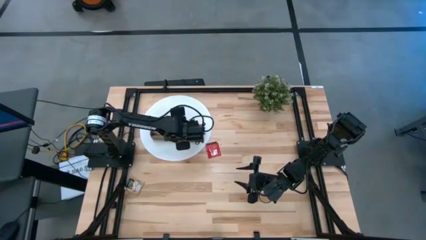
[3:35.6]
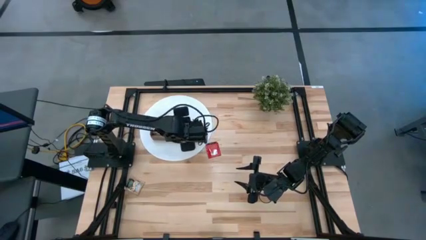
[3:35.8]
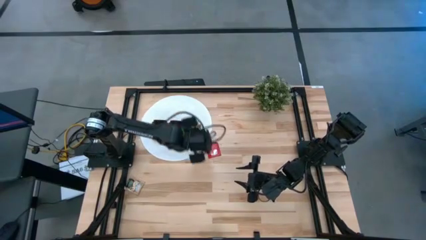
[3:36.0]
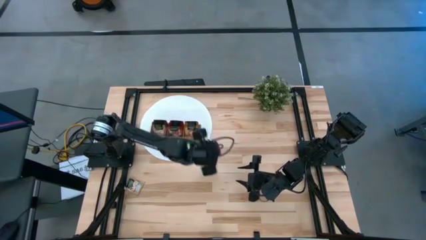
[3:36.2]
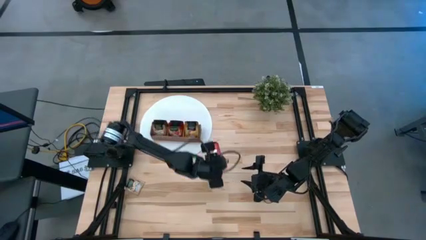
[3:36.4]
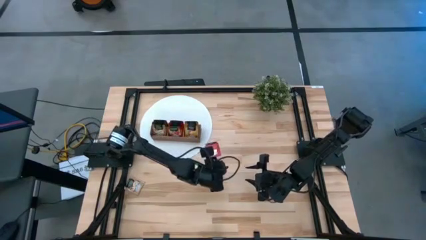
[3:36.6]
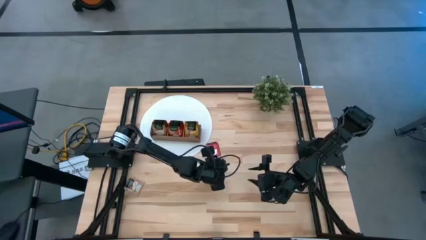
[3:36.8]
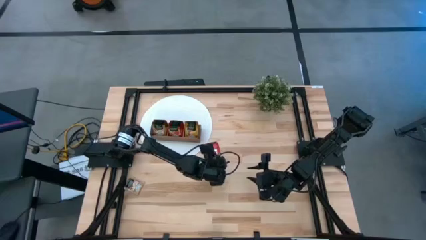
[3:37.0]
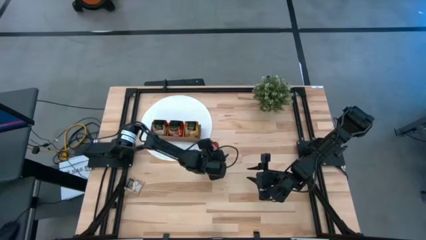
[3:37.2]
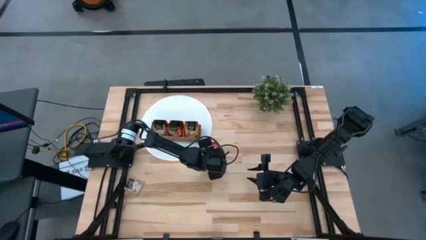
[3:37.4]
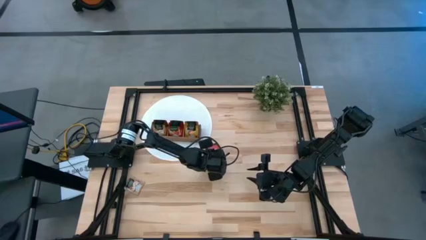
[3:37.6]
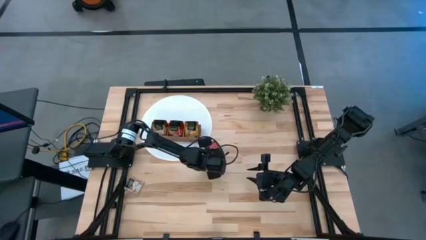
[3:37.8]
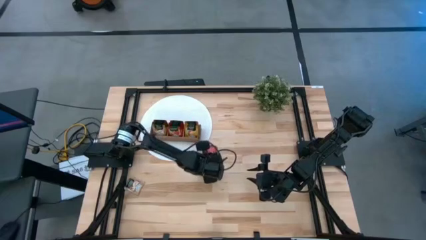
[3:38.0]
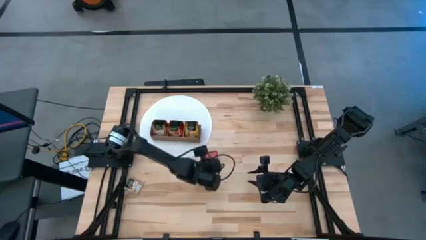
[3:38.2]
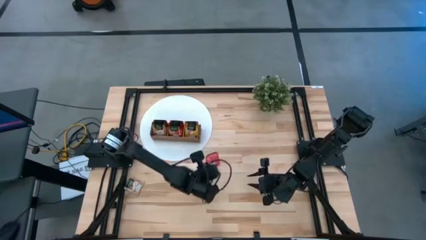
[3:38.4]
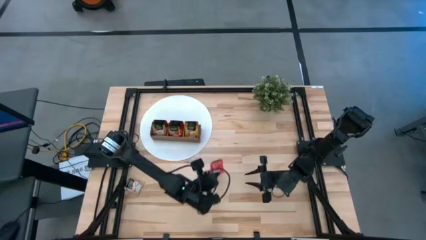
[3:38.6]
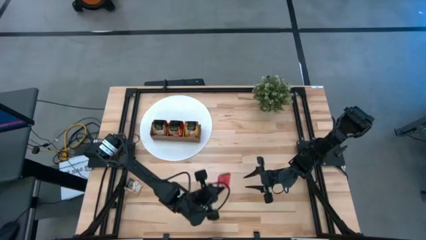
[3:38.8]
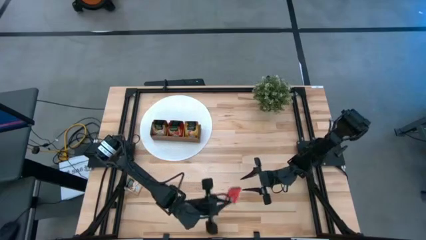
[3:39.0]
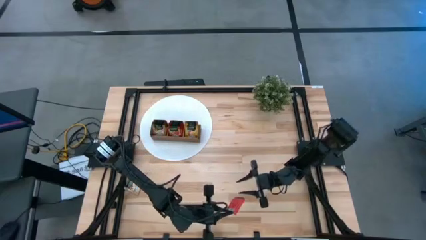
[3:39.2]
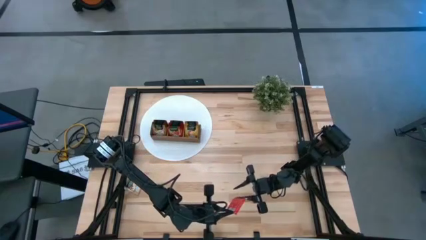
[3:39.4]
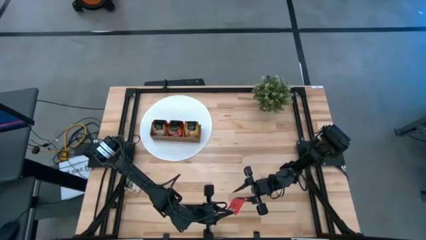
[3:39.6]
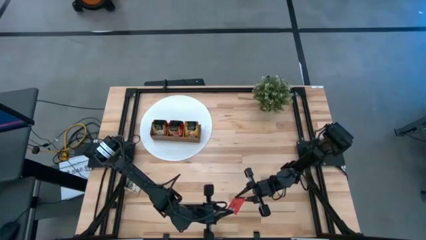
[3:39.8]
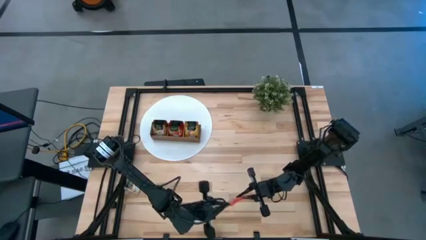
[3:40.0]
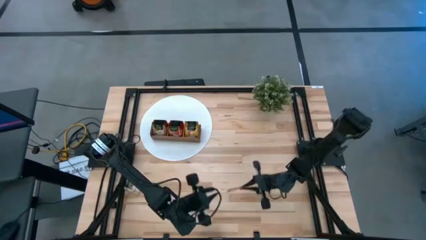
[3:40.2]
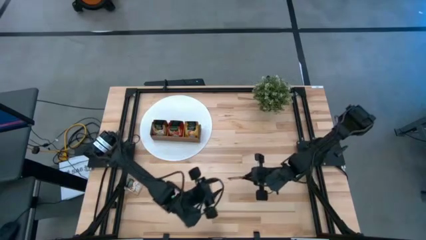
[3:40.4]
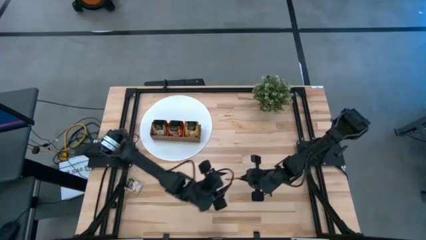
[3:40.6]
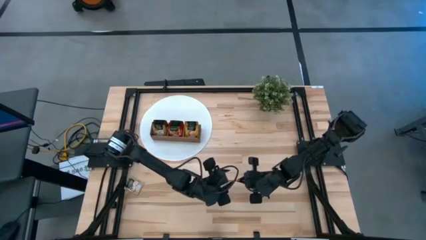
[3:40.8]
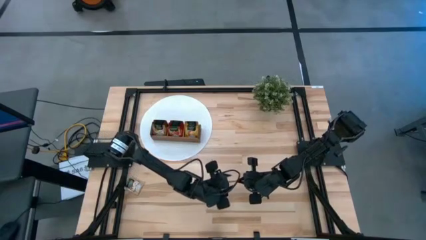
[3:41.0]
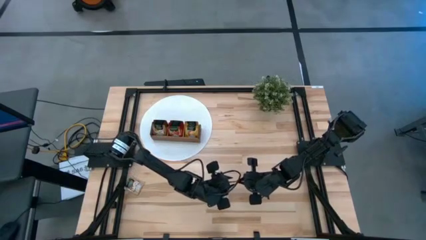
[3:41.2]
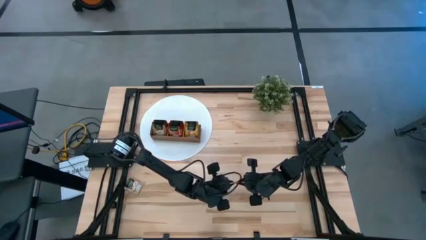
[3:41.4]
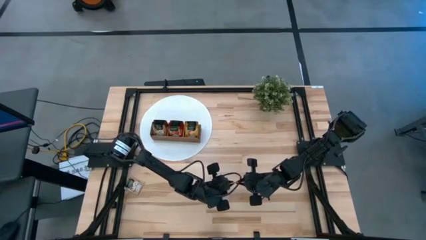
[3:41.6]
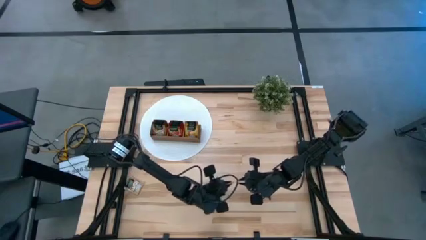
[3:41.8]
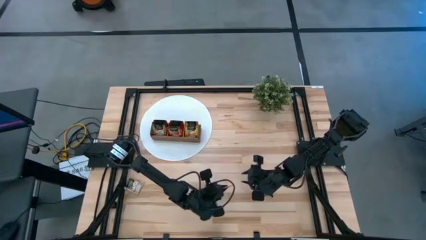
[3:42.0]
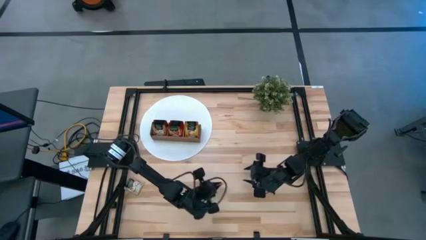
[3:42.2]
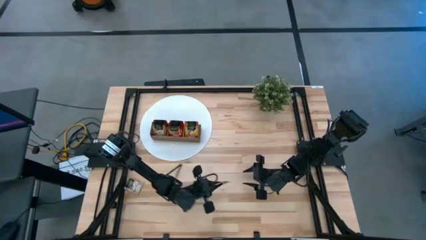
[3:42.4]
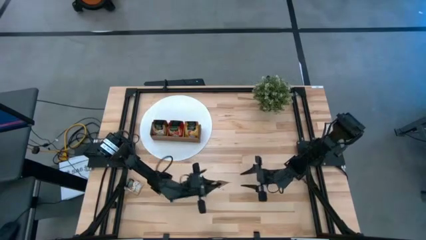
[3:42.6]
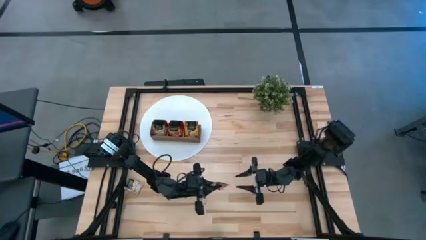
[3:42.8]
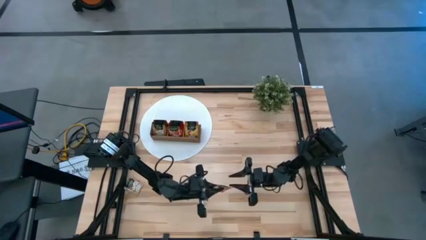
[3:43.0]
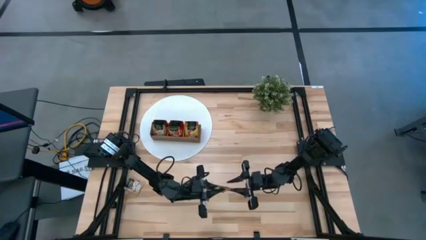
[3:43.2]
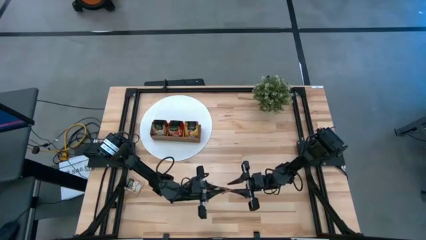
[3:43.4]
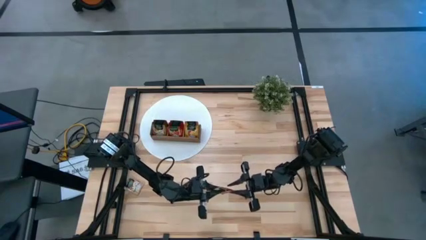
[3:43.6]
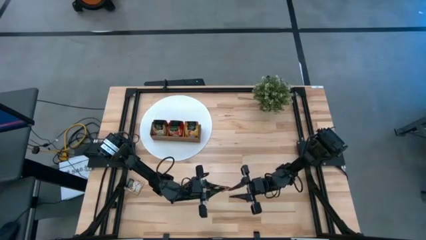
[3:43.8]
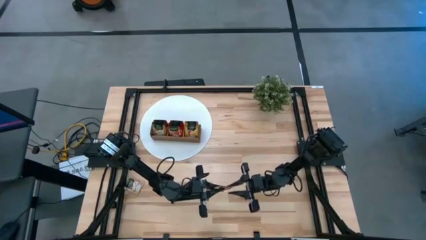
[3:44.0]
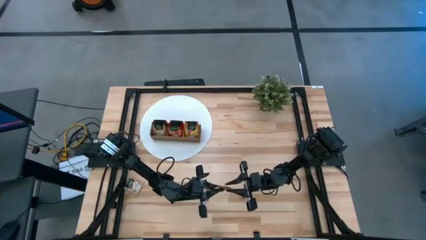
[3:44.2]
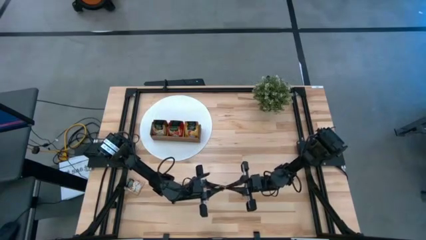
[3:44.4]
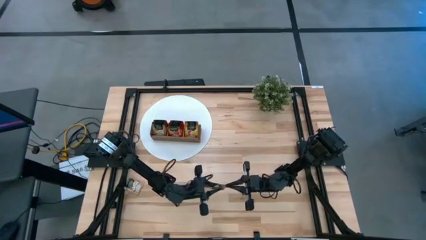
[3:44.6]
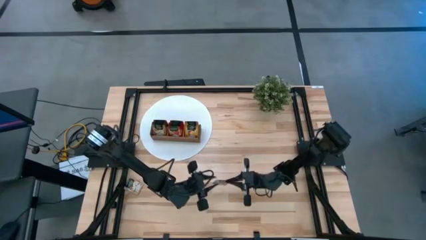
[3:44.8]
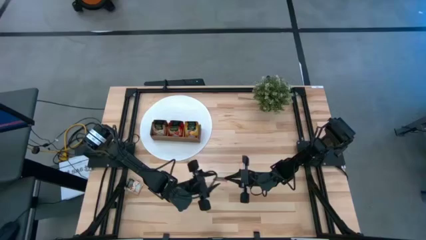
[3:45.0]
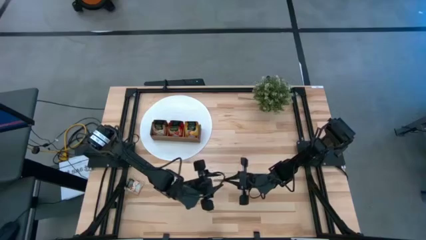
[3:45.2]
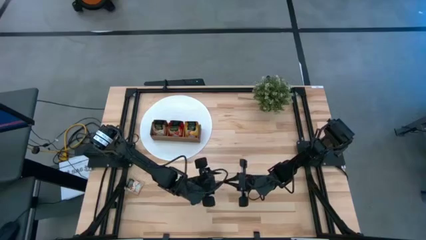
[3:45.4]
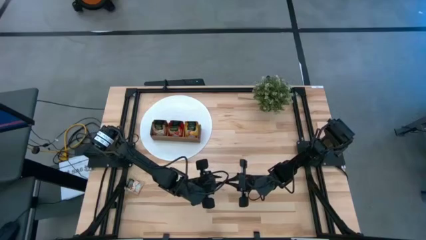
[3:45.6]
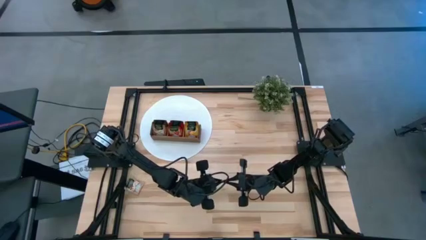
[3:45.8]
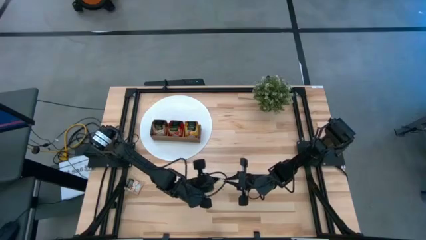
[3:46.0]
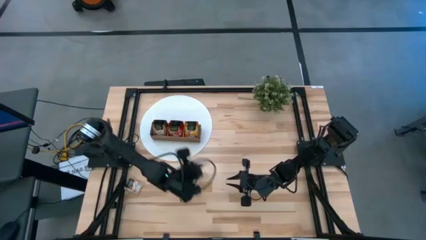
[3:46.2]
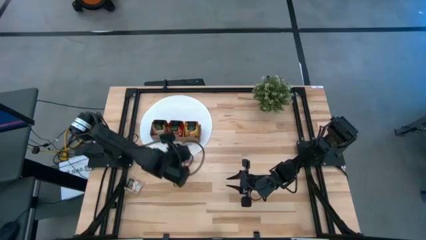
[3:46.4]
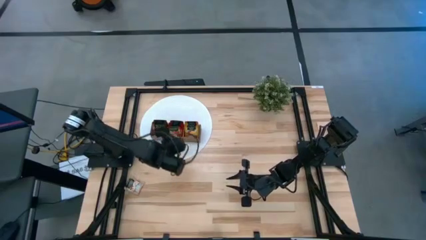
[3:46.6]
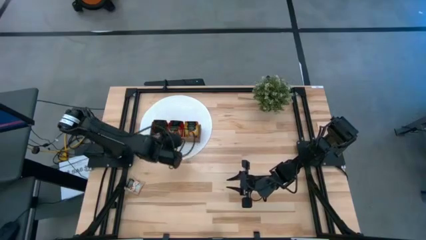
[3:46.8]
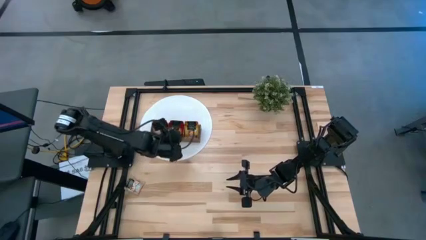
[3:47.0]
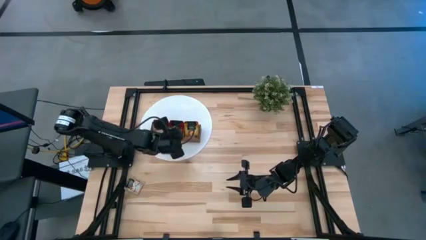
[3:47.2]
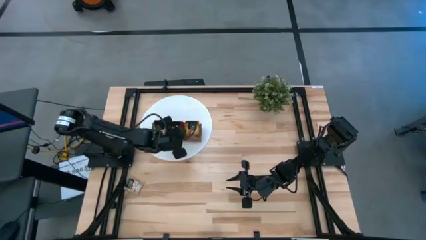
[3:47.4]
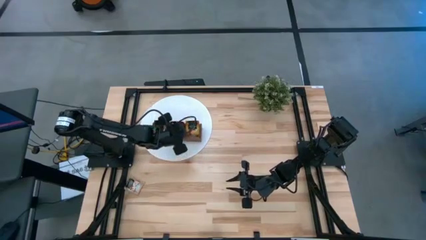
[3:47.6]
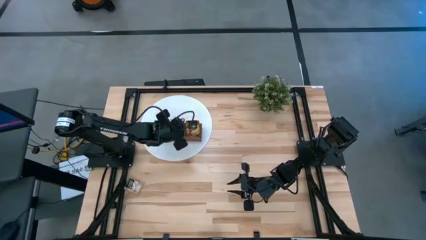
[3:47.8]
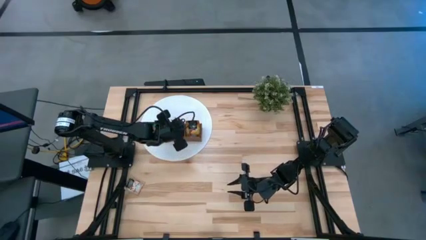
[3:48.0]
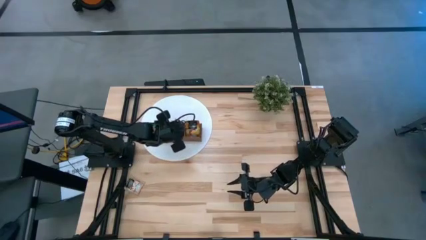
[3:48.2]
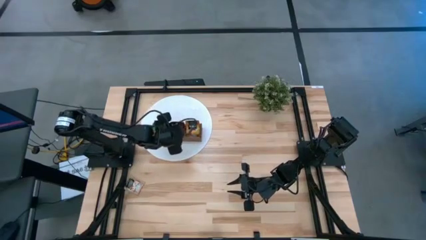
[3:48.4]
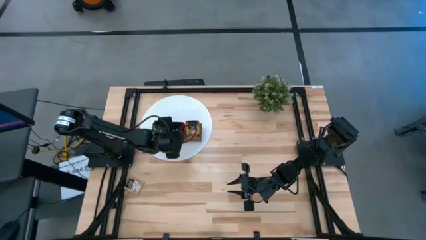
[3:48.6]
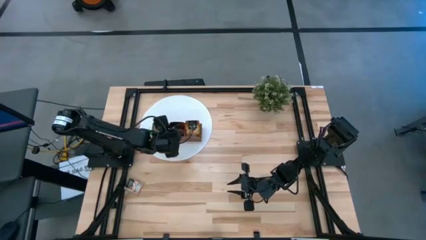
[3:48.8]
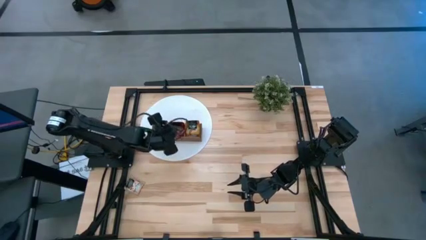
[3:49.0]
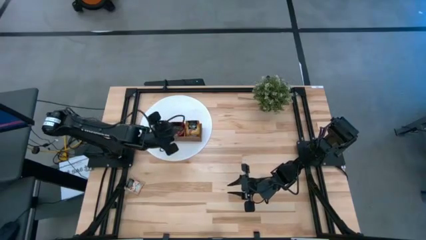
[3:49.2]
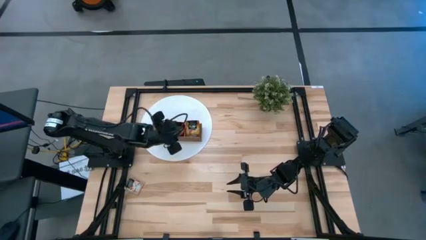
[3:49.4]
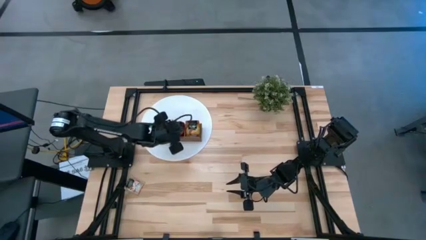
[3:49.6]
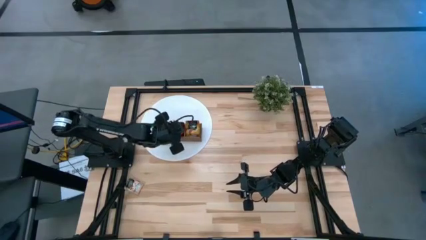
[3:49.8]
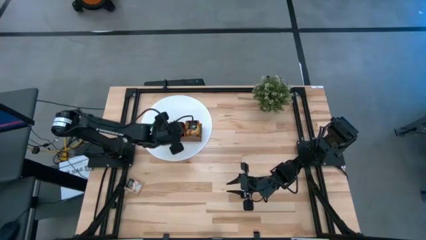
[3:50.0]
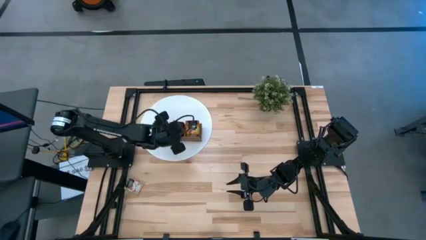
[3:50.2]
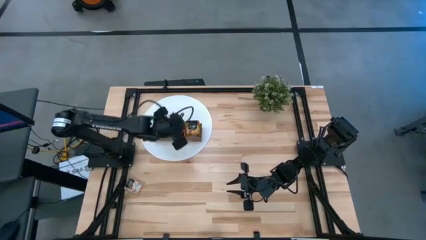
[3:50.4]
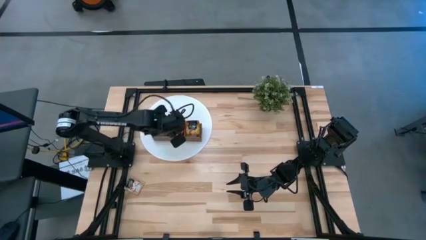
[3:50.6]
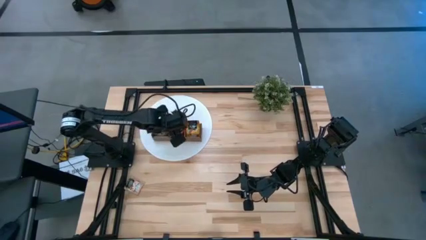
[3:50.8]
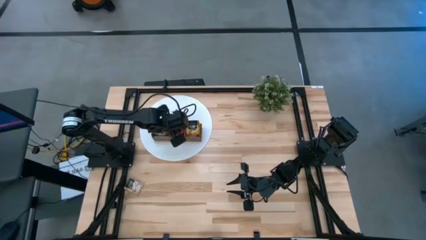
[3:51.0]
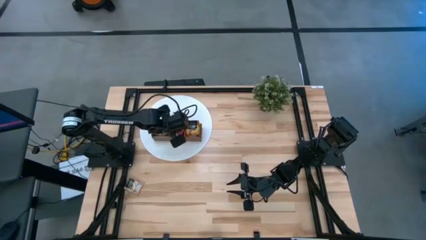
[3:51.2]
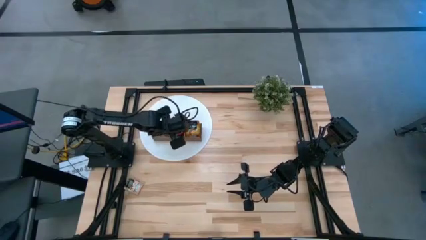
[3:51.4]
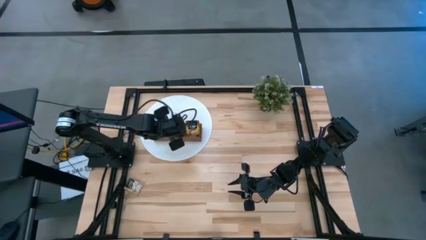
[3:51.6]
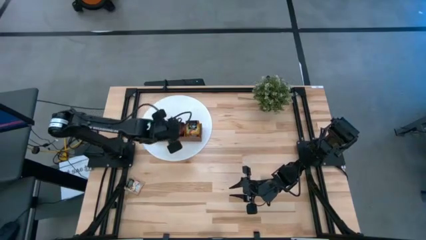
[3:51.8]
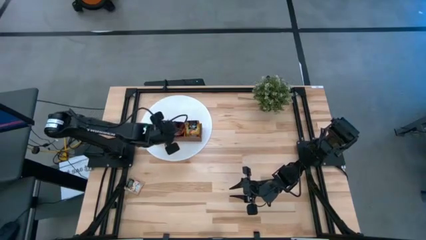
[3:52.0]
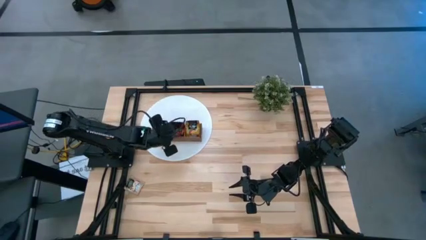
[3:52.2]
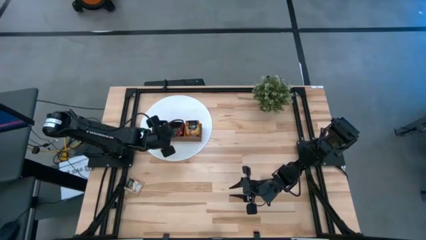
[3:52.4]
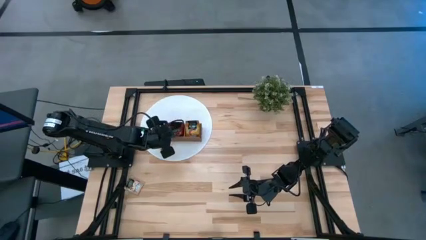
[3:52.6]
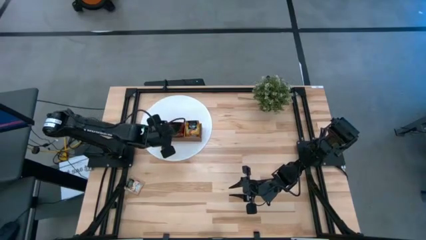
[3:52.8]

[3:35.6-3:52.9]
Task: Pick & Place Tea
Put the red tea bag into the middle section of the wooden organizer
